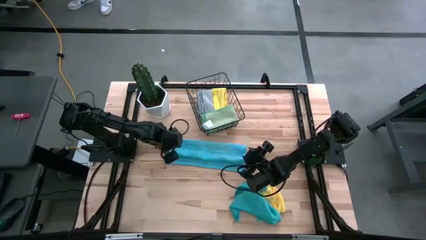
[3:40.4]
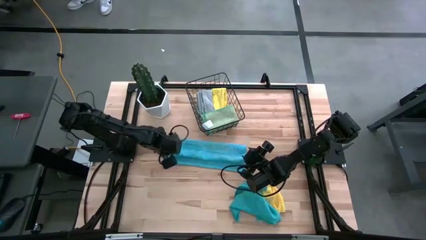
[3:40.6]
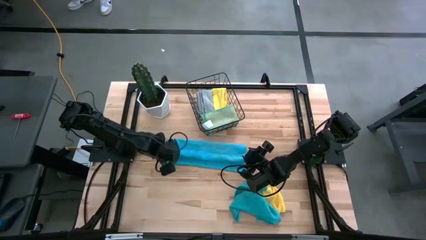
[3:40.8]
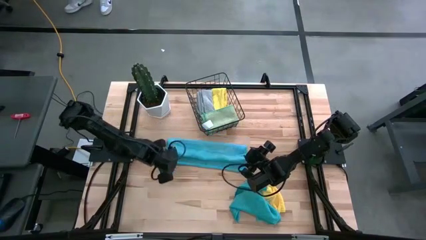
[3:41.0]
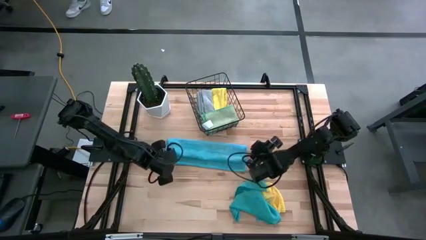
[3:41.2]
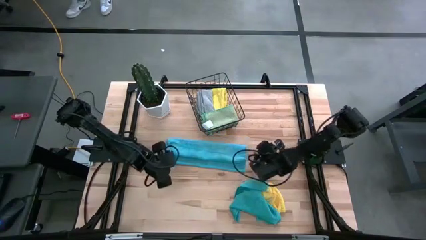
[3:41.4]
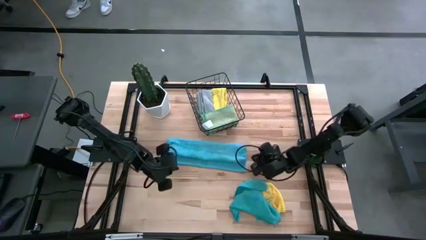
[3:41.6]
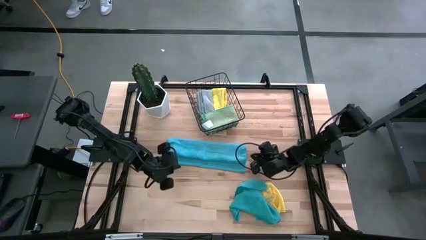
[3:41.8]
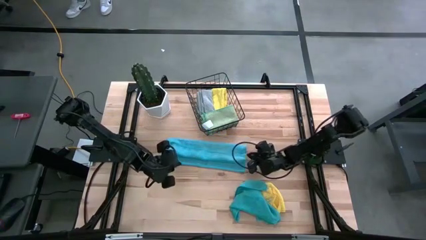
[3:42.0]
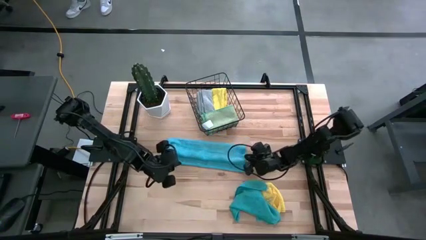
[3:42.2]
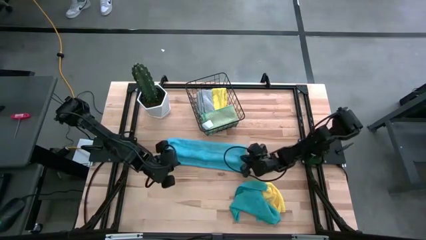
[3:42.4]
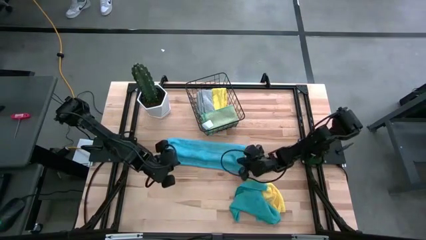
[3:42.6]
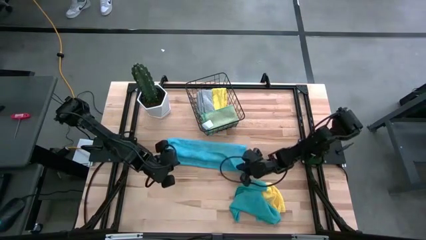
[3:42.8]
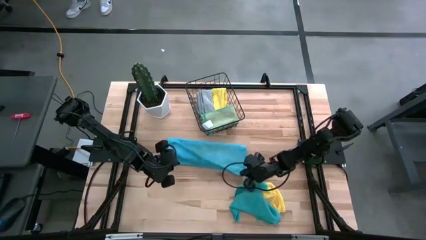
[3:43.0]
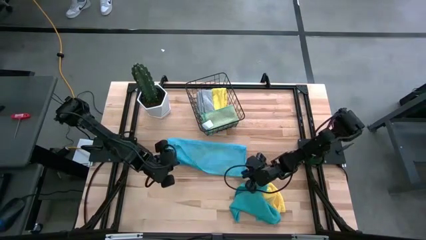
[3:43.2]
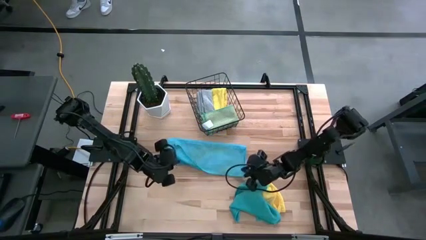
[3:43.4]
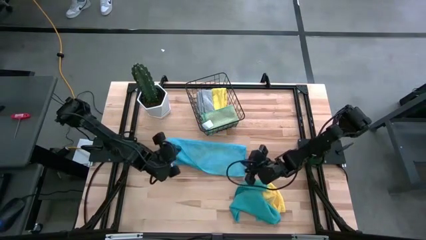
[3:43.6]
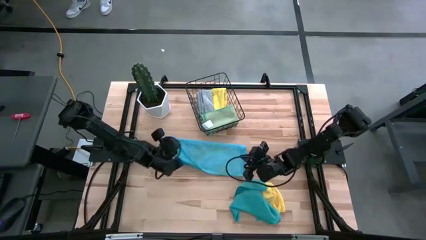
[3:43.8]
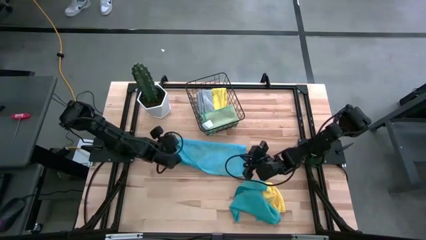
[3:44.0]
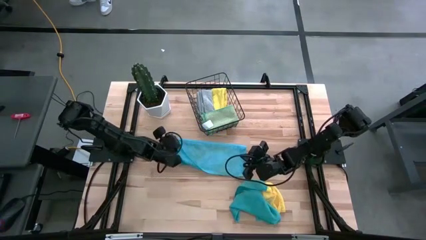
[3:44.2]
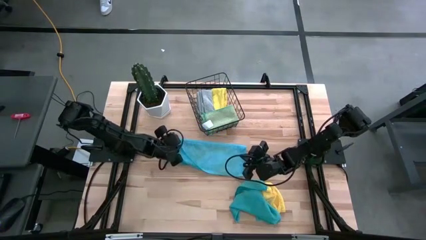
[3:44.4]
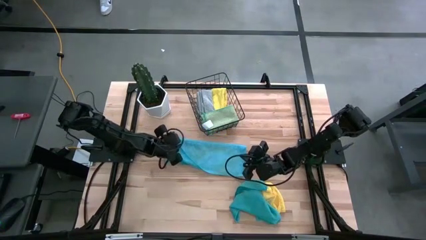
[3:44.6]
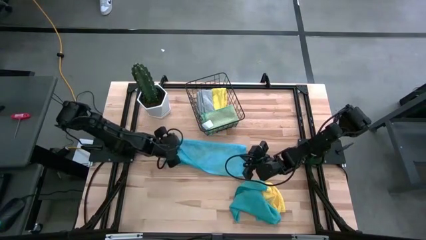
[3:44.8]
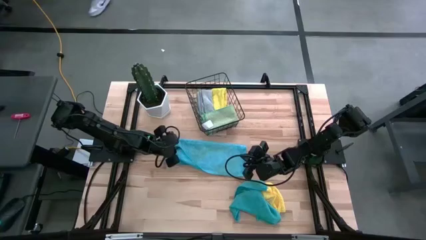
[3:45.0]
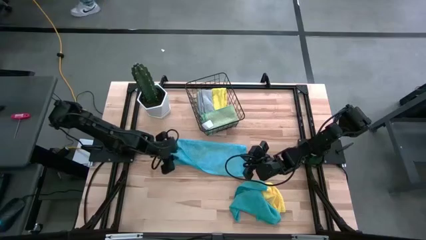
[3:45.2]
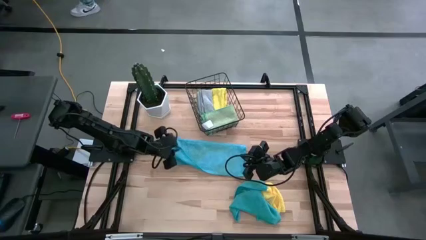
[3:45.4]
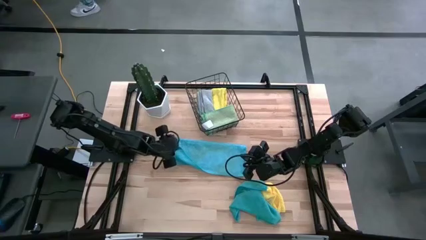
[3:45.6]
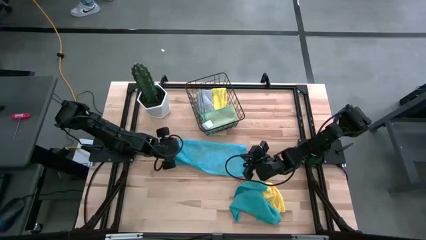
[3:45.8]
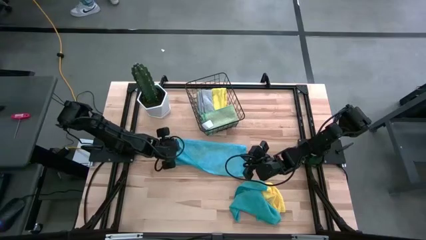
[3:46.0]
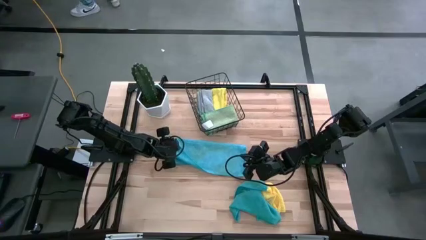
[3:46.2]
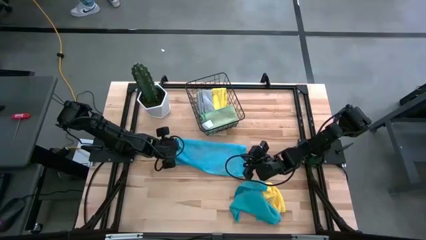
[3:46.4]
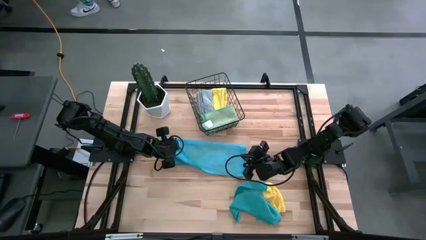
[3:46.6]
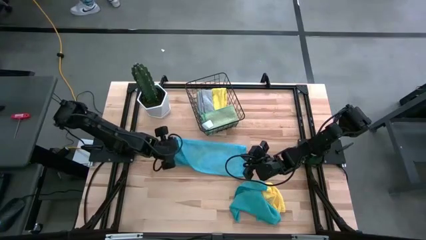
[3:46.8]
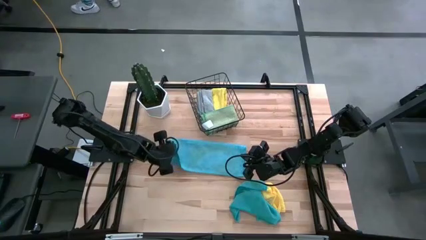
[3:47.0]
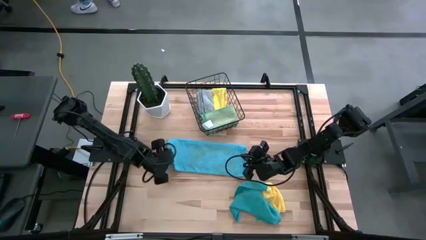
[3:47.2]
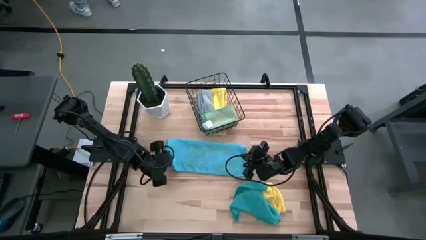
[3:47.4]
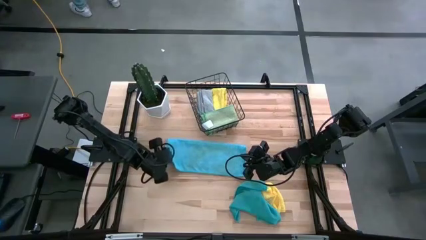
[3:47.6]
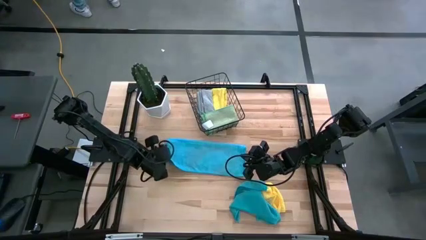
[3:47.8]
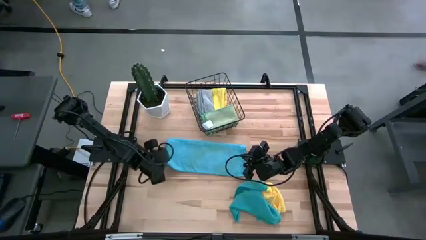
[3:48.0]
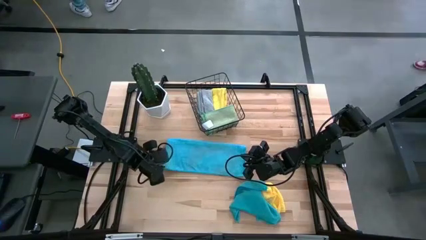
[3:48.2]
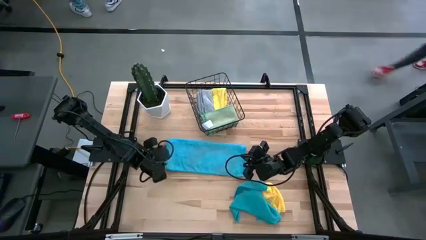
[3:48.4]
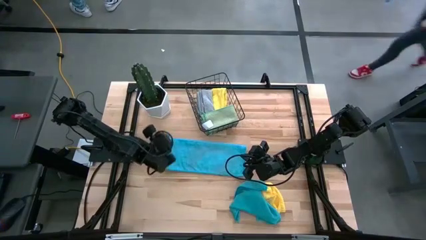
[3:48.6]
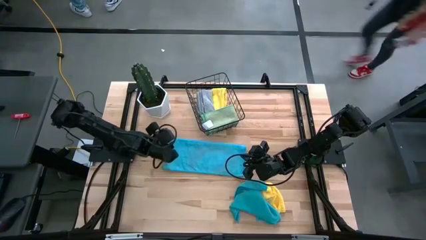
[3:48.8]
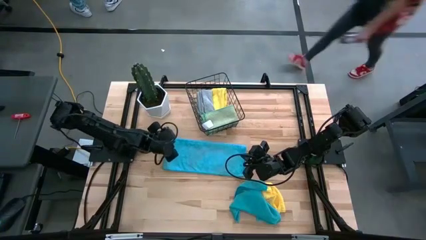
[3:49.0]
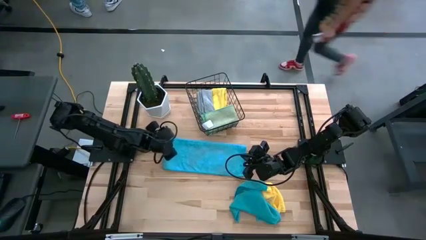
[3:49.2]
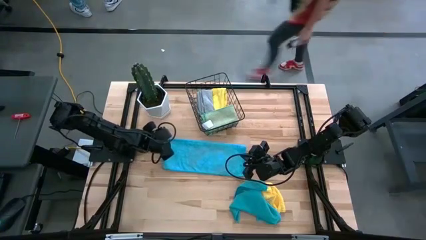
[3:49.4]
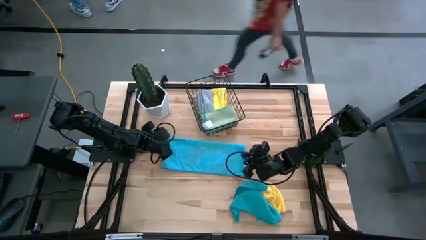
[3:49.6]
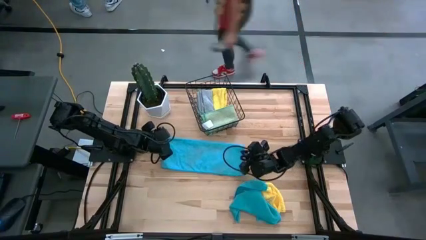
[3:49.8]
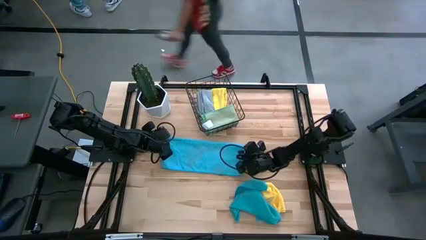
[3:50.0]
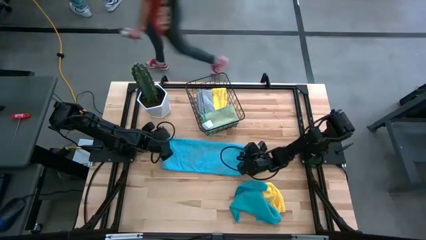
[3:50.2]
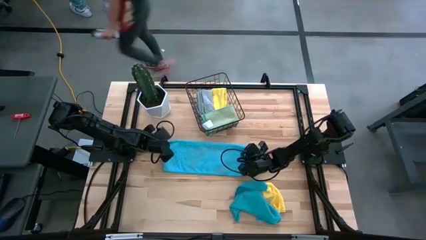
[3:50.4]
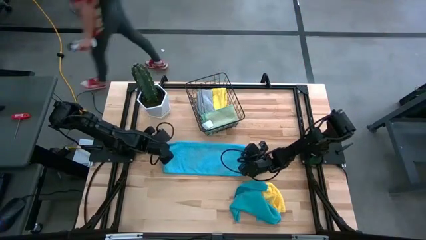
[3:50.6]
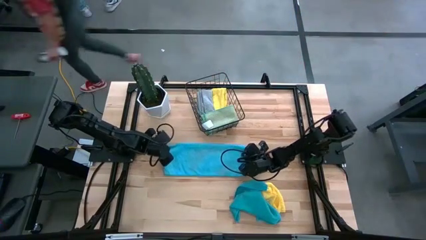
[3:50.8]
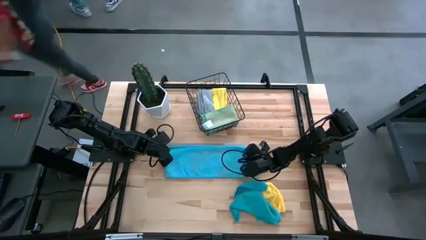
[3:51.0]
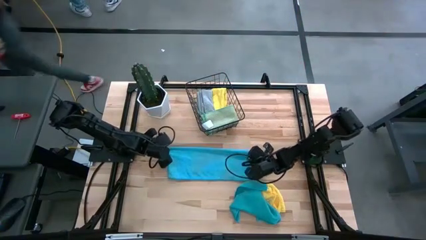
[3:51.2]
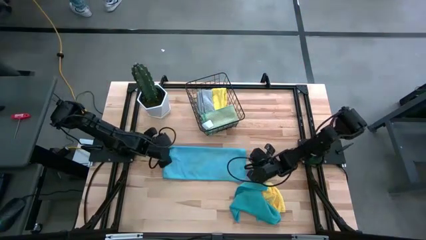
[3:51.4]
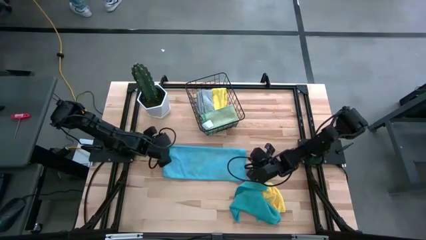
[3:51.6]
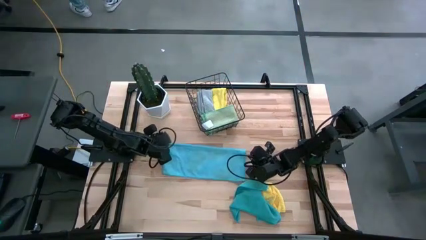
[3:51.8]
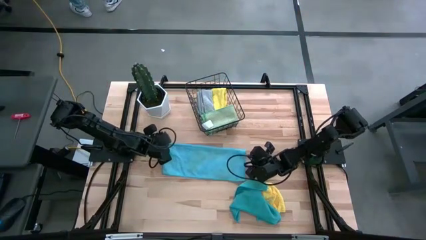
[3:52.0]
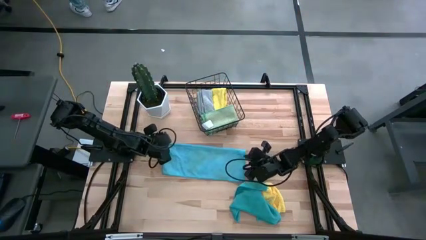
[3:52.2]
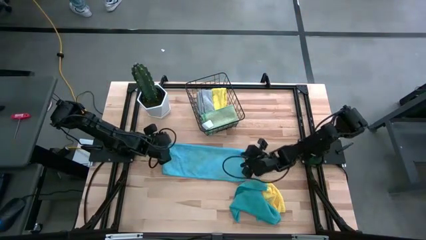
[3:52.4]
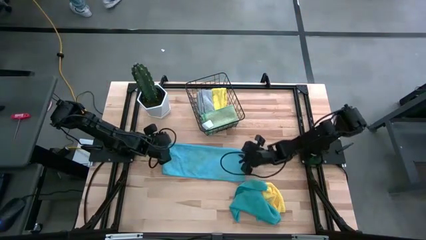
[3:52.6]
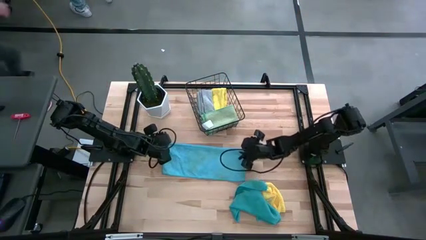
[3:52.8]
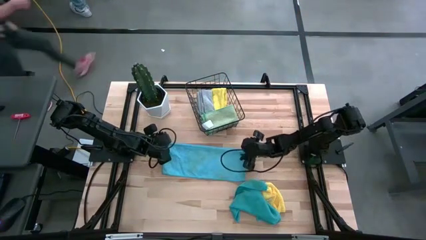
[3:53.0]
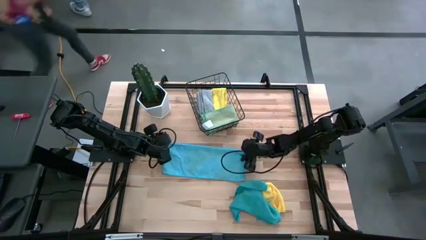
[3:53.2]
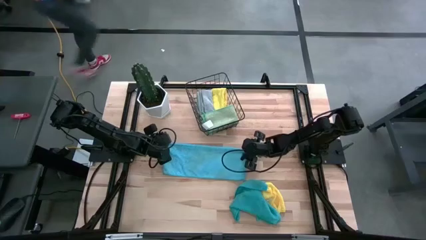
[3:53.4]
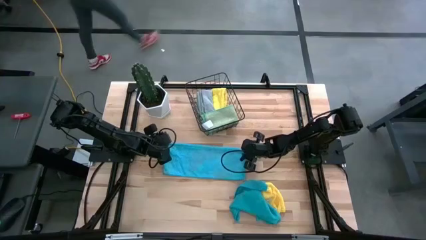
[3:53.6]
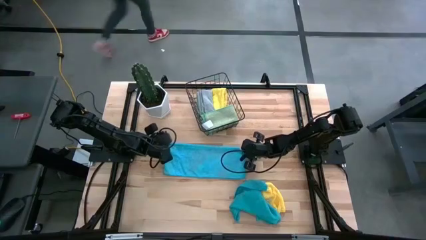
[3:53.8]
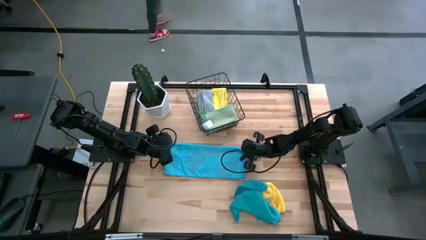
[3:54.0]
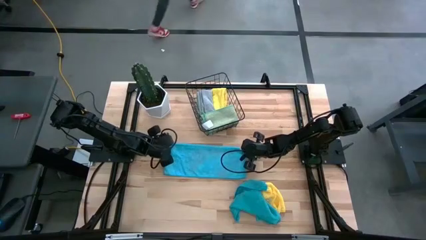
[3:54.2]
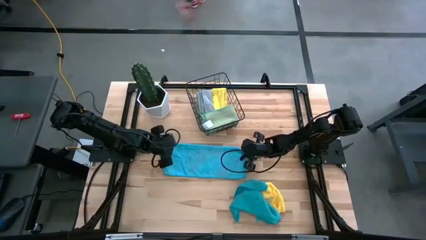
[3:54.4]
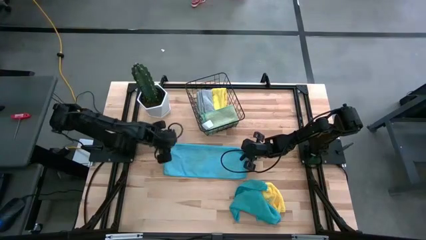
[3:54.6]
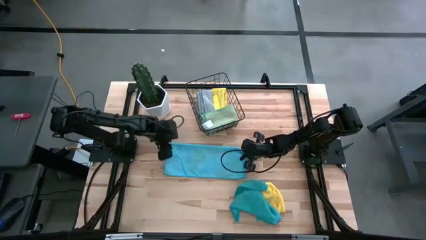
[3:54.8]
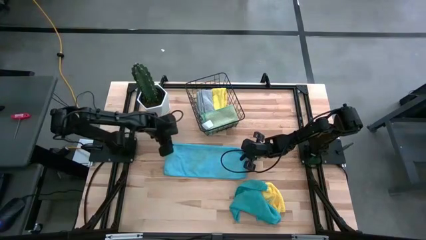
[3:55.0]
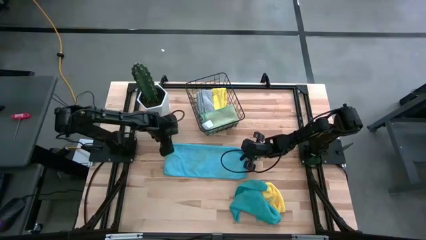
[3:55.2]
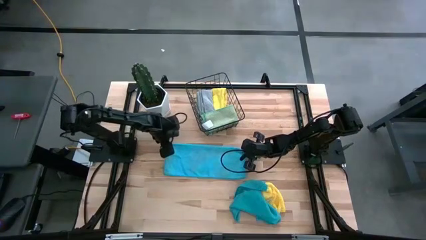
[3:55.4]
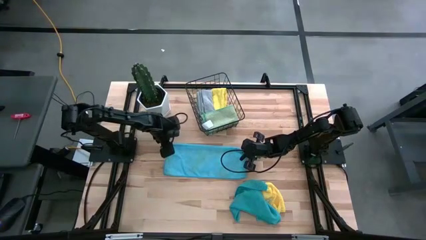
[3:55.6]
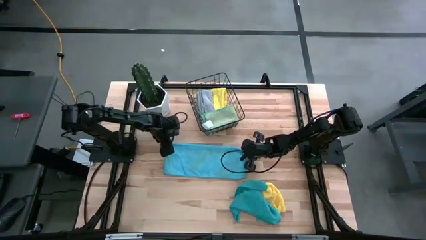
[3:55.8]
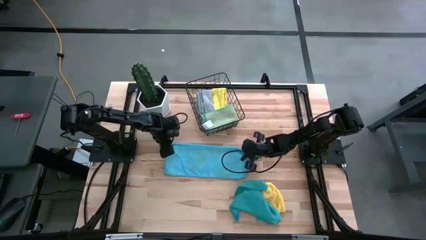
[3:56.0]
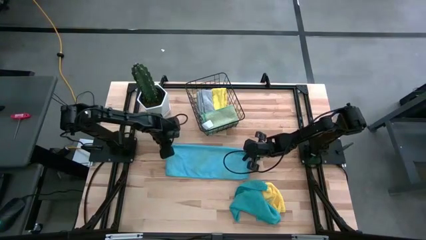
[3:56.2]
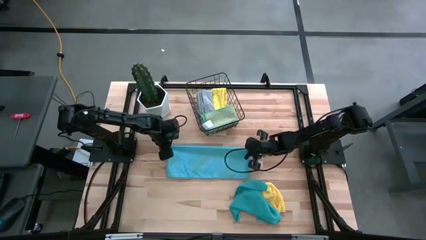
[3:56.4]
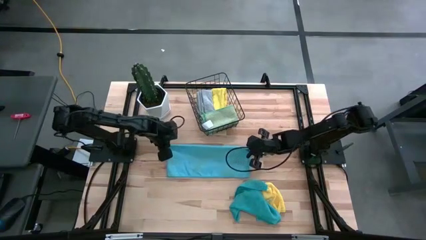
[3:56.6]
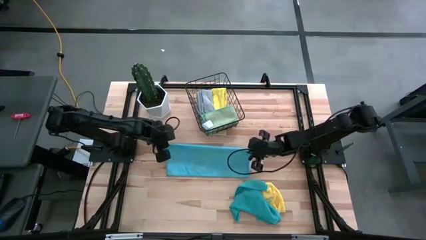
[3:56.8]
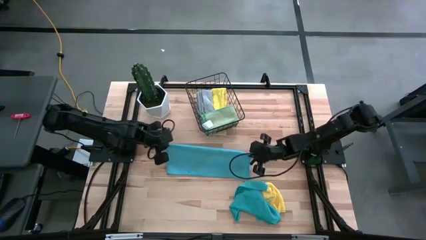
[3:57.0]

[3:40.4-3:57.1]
Task: Fold microfiber towels
Fold the left blue microfiber cloth

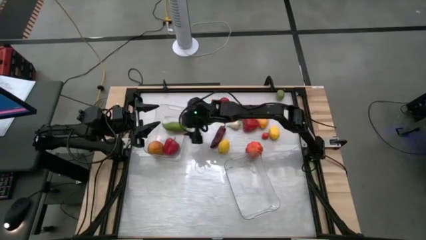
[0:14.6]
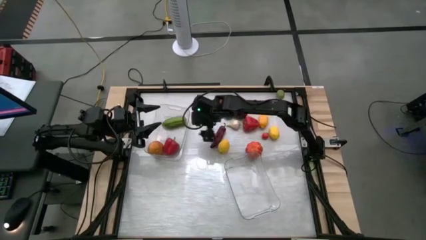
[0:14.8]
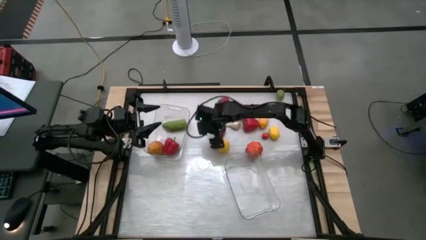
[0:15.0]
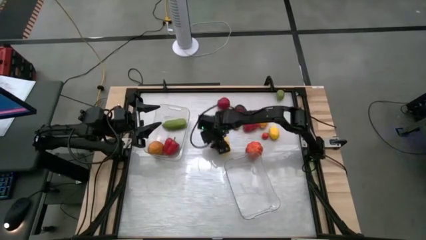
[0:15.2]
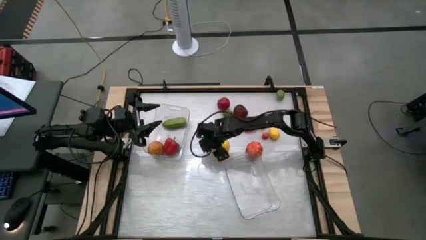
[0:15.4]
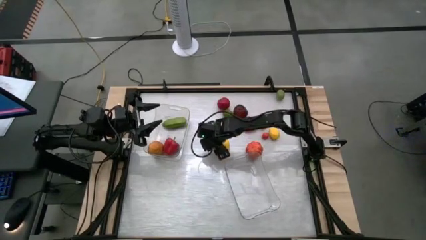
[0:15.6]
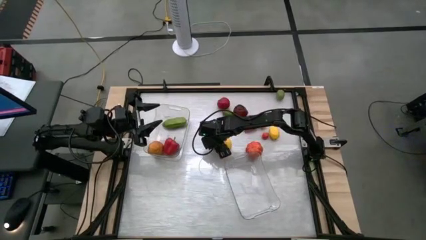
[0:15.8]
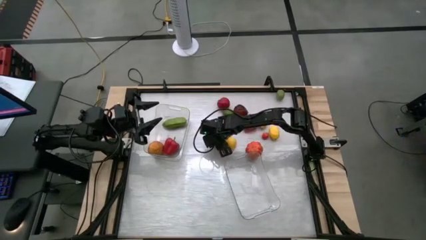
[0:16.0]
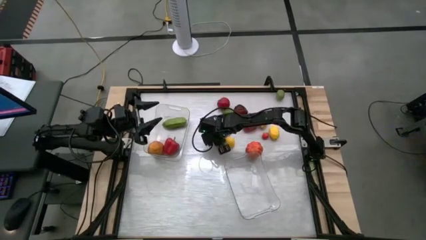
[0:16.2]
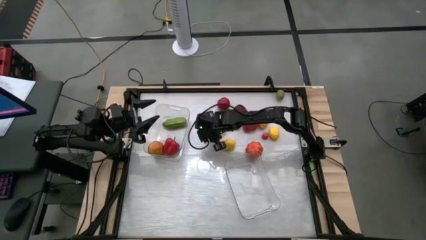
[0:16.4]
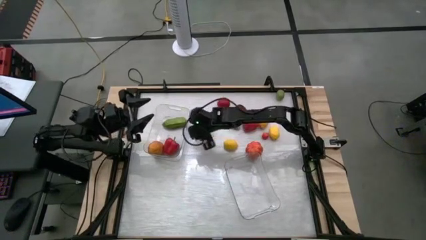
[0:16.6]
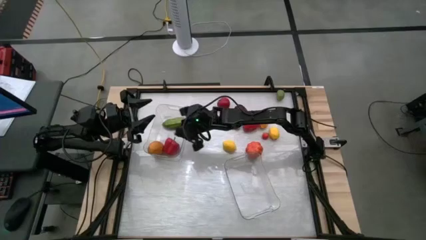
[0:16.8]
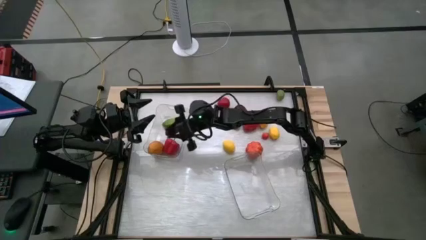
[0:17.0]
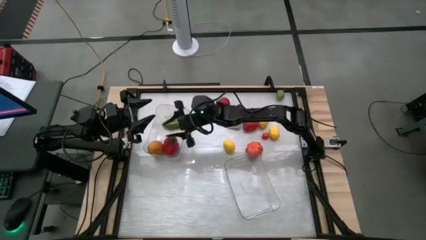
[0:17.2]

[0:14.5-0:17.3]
Task: Sort produce into baskets
Put the purple eggplant into the left transparent bin
